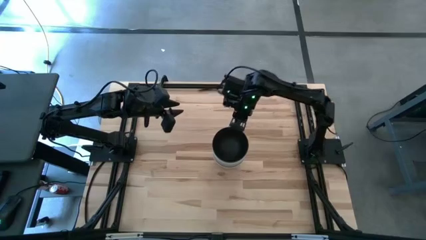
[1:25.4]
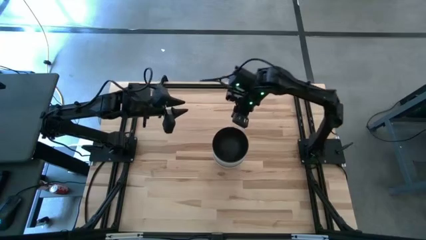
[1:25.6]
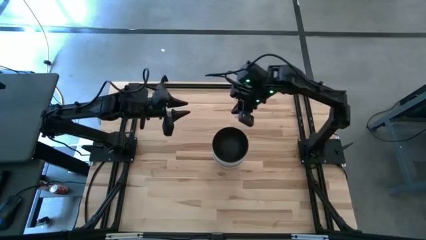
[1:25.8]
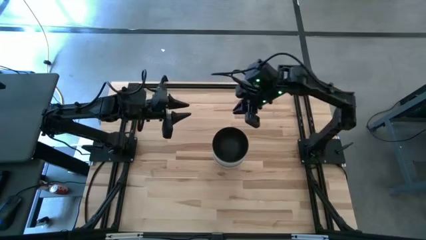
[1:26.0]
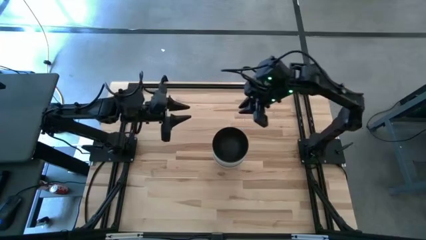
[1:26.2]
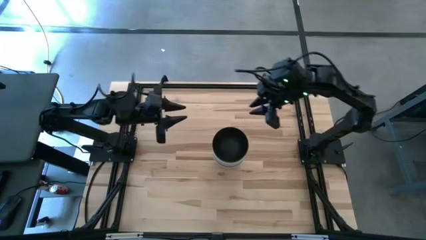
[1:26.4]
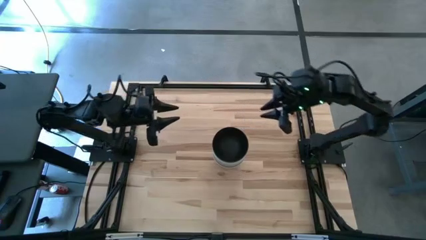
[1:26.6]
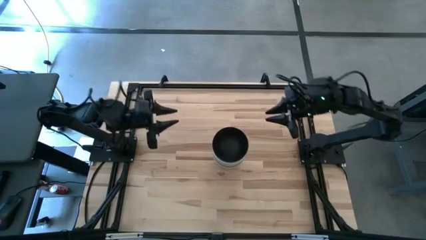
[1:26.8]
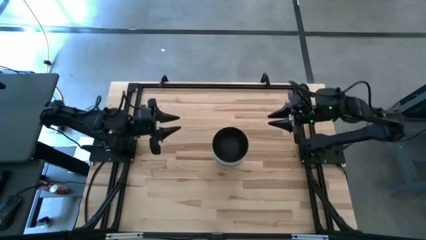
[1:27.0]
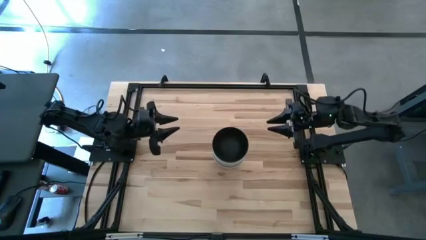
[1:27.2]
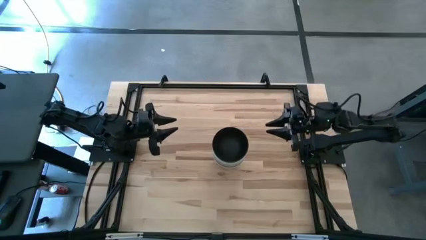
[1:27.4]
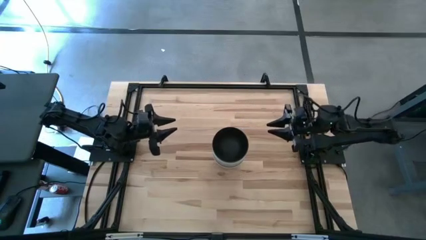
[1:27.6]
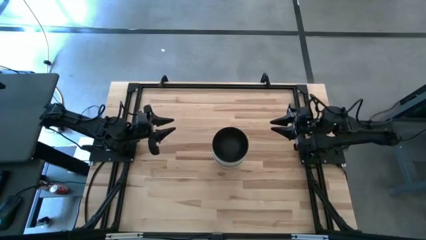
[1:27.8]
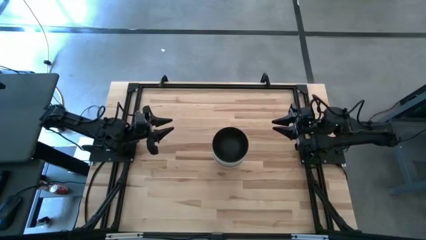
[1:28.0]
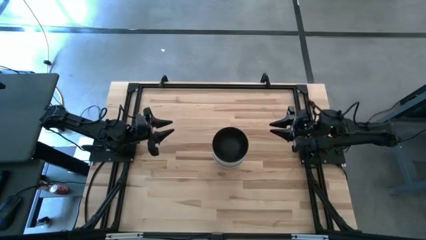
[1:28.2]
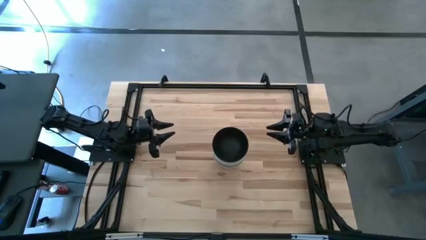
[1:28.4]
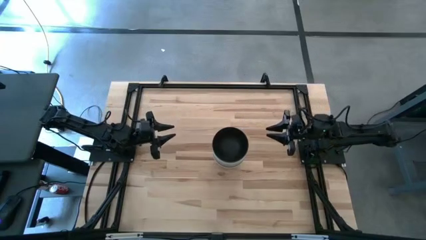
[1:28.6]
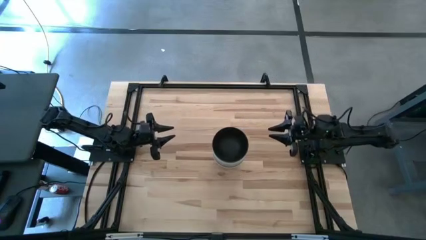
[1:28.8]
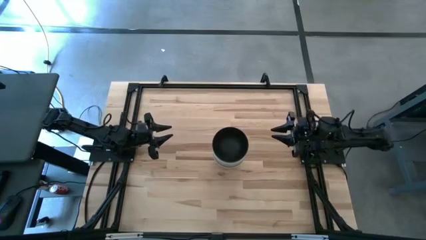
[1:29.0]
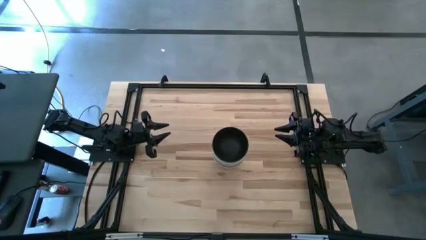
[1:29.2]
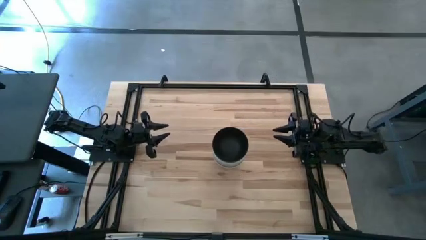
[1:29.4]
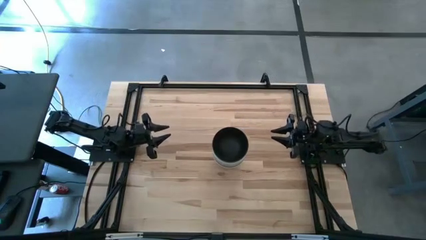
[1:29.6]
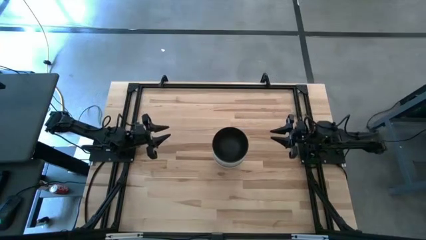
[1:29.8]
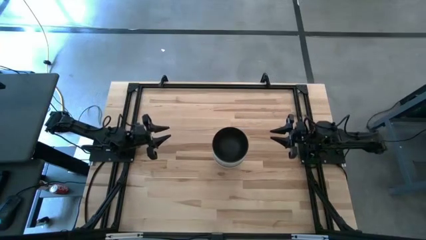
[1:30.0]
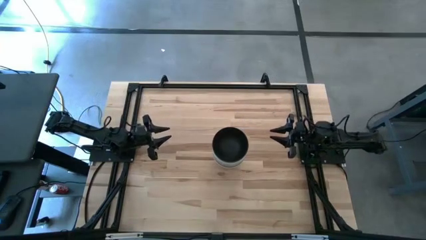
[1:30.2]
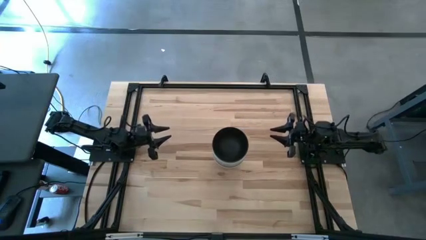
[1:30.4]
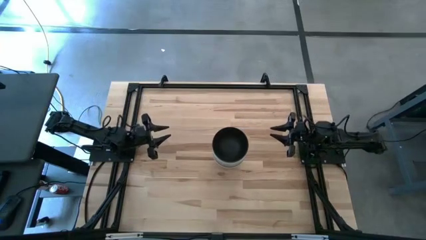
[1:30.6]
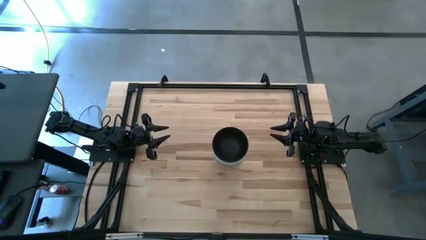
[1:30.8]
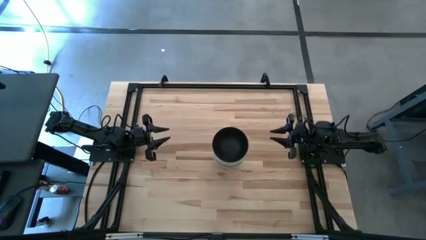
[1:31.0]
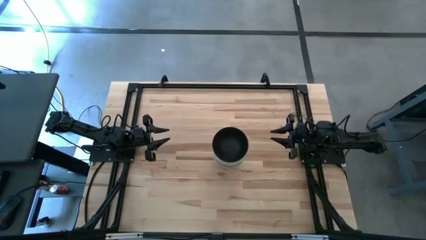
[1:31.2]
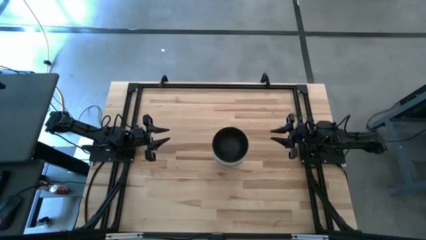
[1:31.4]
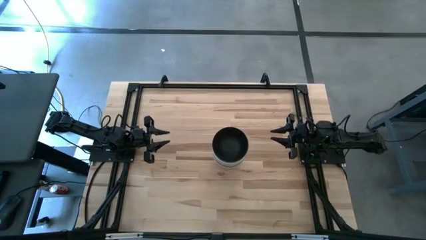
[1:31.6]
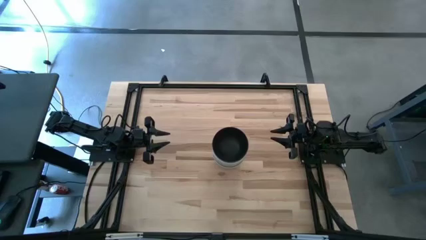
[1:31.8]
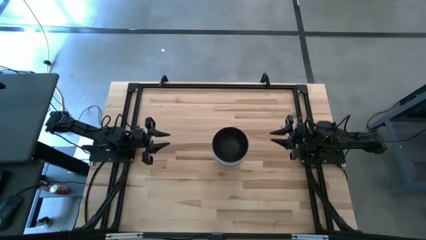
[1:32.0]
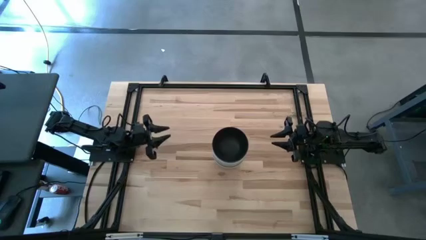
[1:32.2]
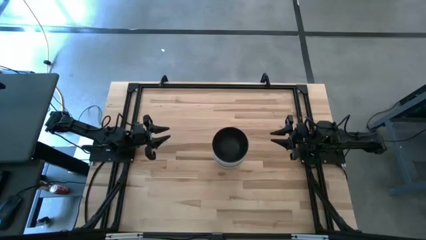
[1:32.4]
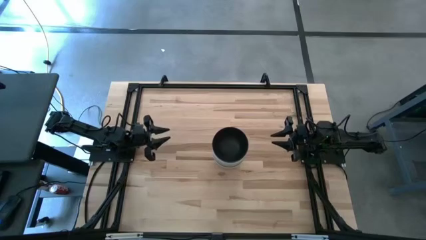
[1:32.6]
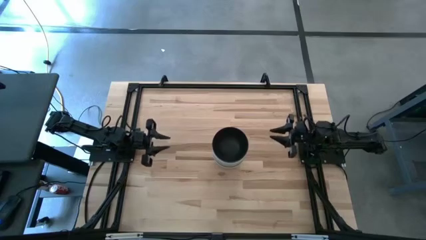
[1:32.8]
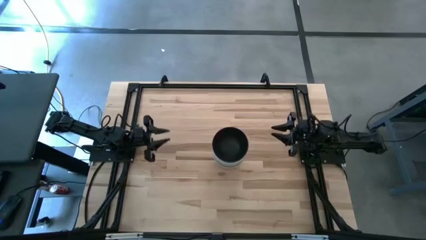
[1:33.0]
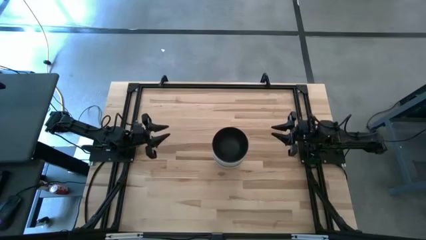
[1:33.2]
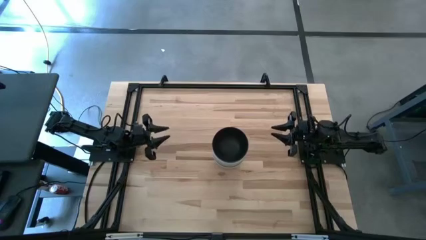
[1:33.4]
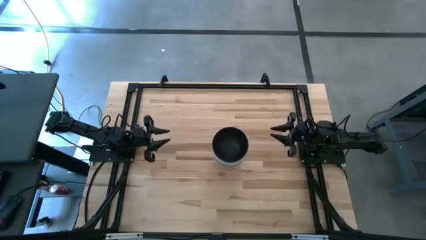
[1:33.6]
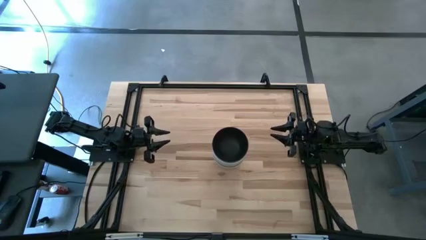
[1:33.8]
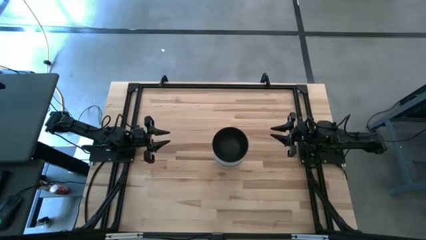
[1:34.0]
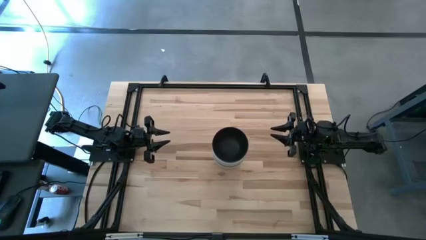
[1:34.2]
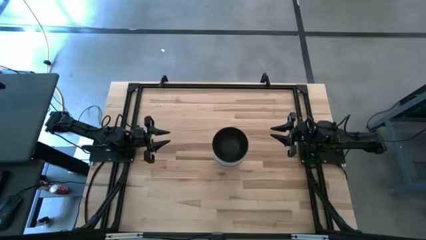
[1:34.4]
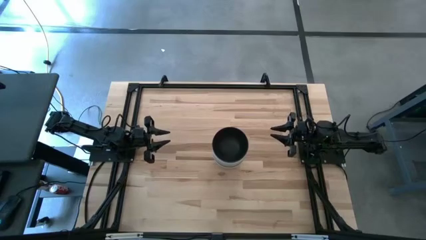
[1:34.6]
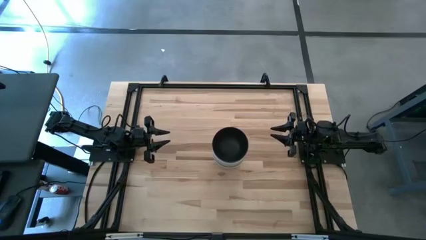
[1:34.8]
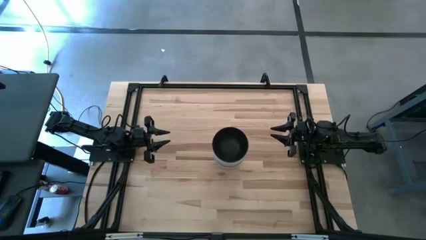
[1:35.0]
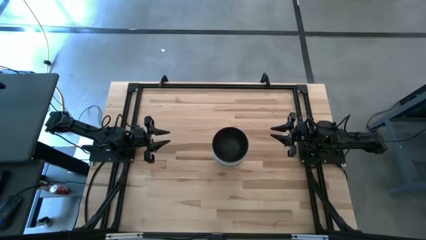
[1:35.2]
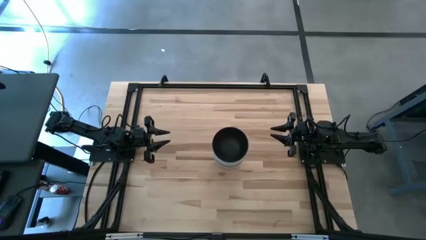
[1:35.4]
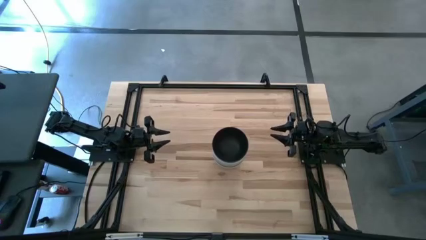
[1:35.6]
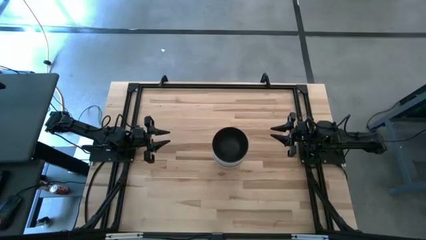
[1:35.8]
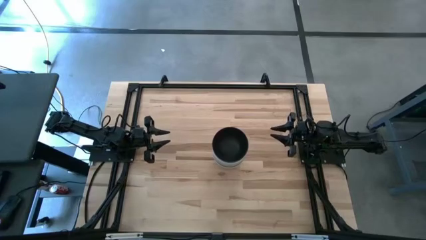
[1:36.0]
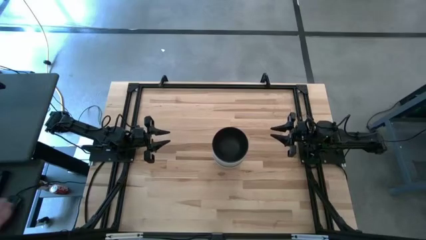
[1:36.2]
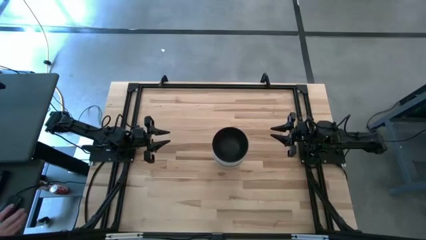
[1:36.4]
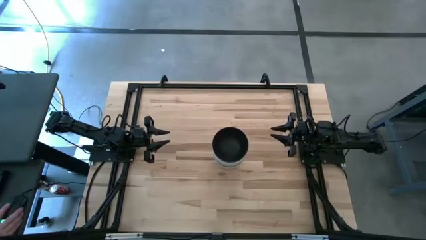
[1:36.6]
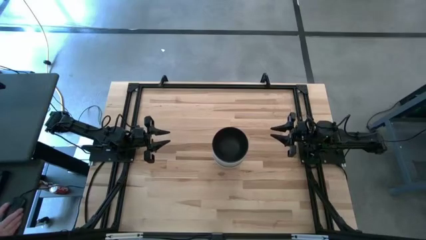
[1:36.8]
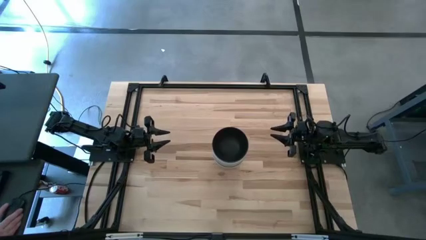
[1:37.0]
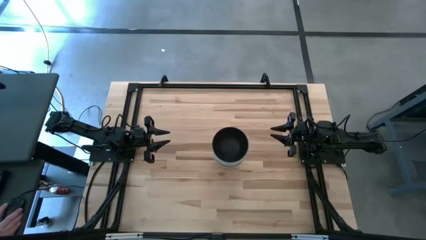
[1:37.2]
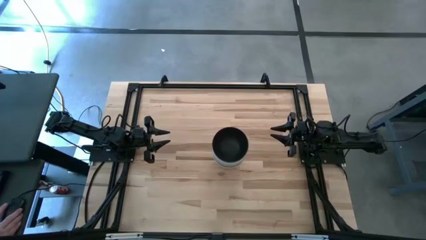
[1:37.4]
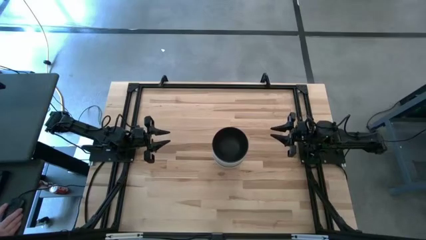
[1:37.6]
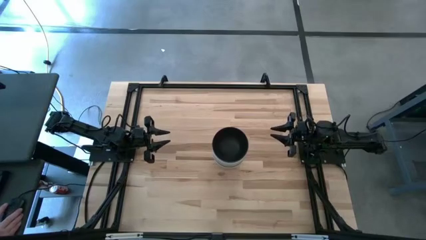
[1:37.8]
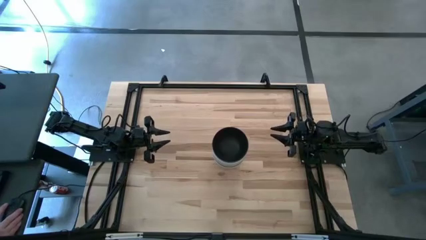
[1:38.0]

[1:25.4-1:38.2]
Task: Nest bowls inside each other
Return to home position

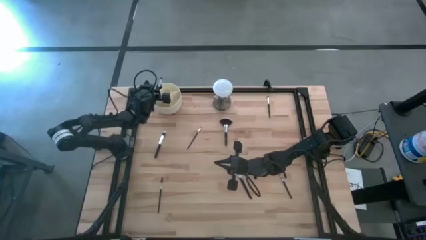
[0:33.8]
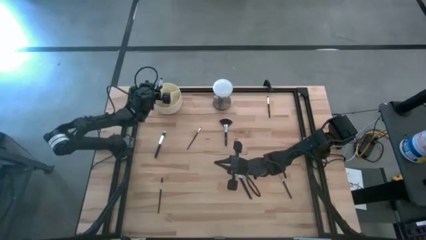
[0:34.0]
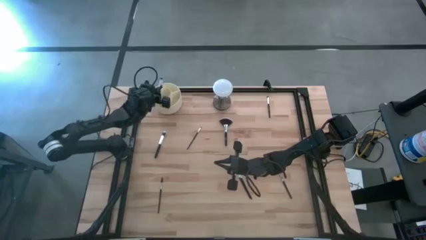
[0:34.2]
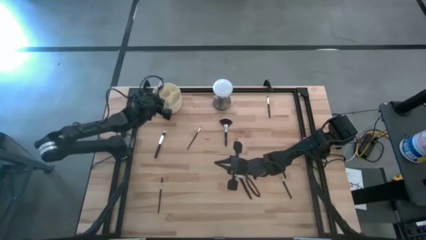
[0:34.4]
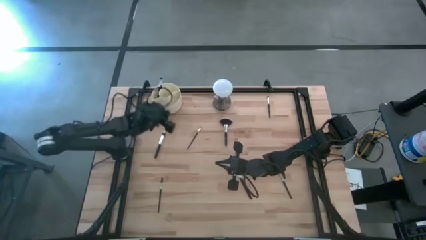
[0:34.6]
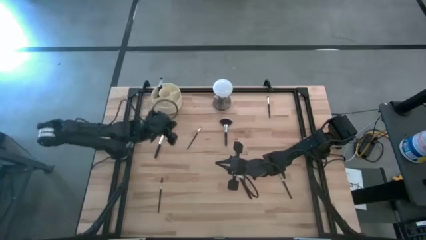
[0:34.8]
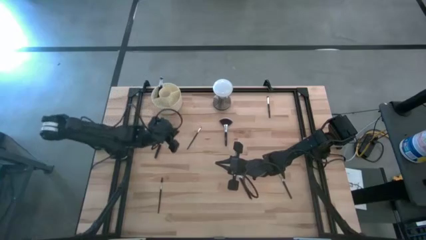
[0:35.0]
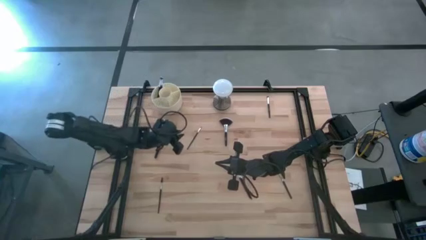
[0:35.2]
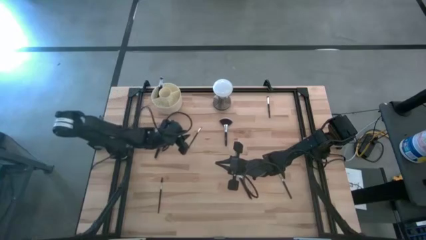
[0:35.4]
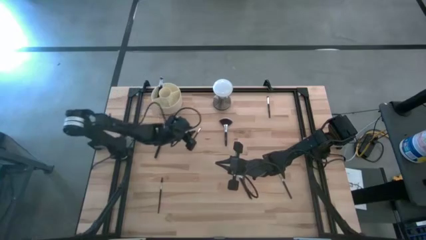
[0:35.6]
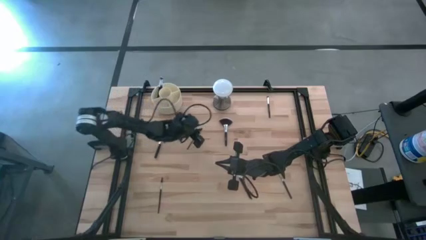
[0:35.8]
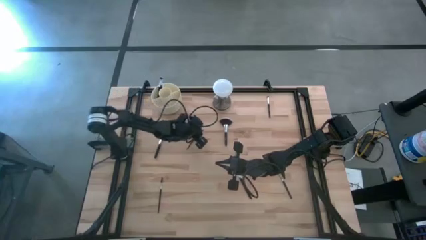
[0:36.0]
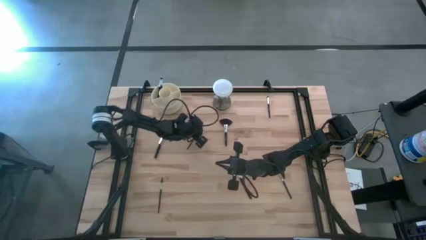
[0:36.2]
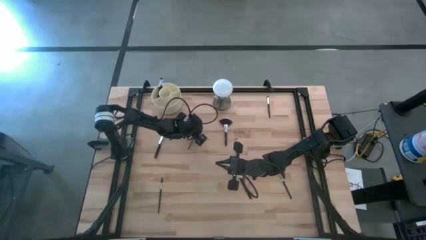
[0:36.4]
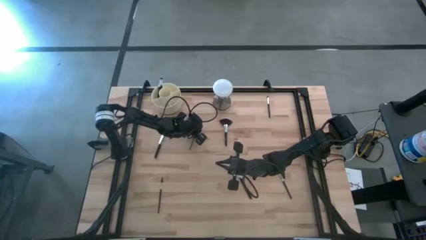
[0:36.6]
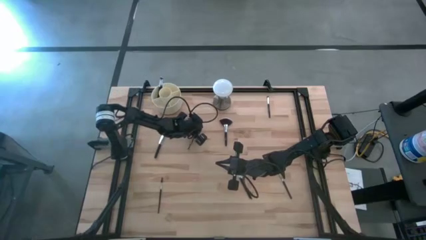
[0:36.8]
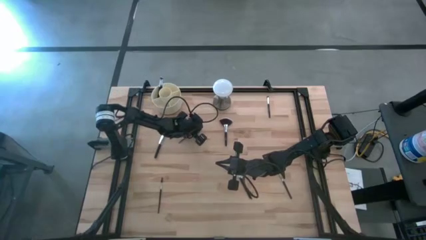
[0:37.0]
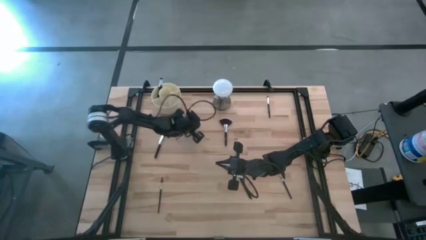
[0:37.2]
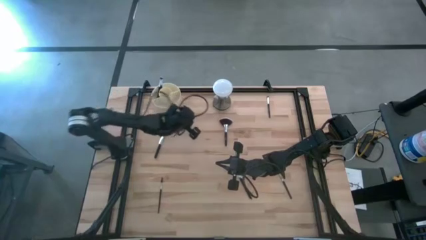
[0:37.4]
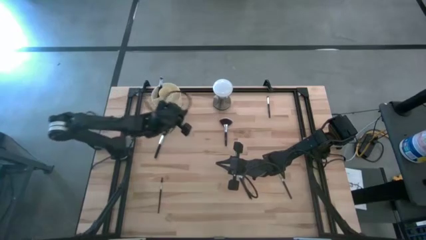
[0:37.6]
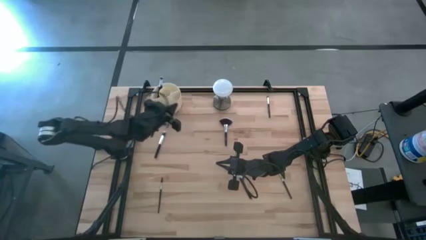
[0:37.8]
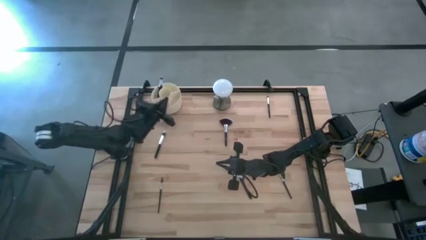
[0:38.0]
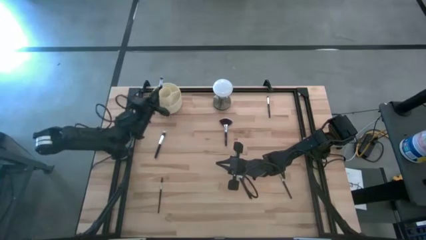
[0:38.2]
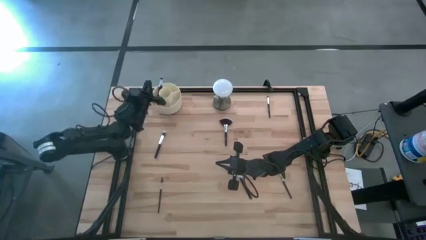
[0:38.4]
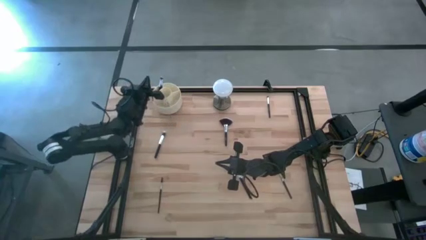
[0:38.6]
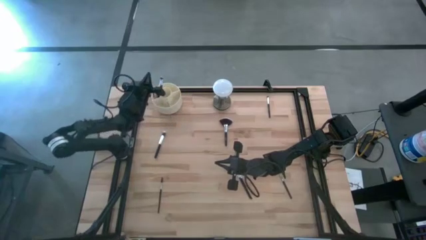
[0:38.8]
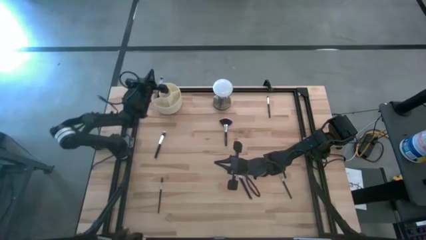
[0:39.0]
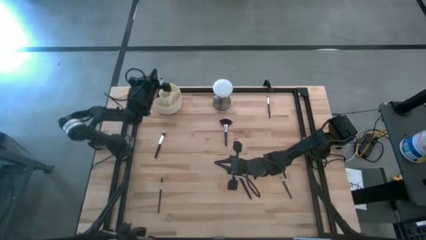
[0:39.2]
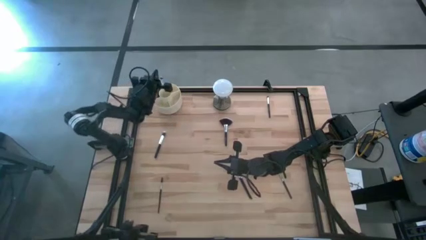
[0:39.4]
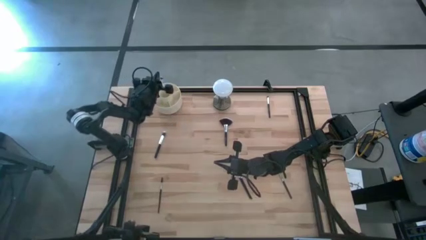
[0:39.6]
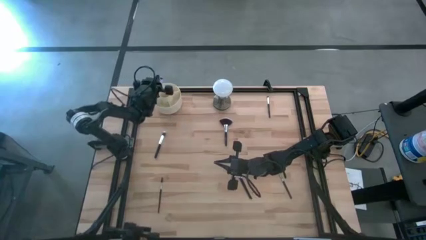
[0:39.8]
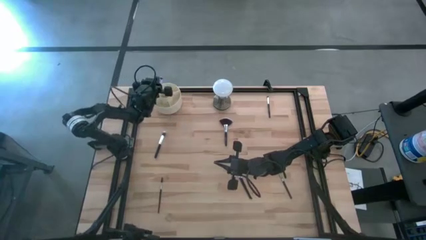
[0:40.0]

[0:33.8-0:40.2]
Task: Put items in baskets/containers
Put the eyeshadow brush into the organizer
